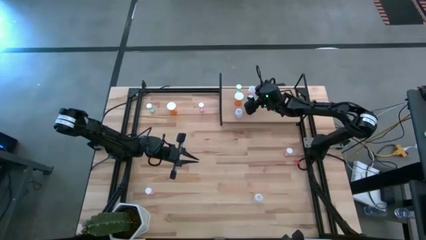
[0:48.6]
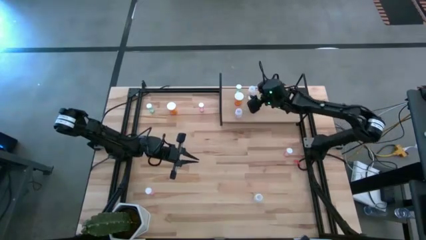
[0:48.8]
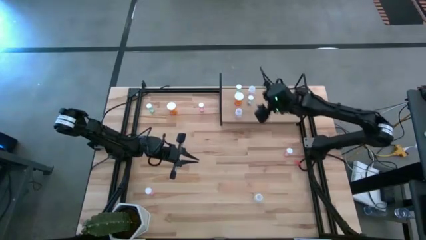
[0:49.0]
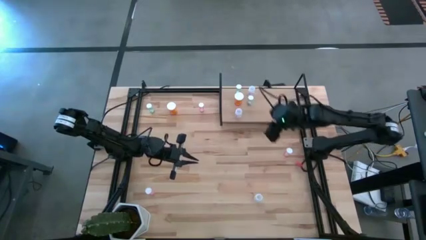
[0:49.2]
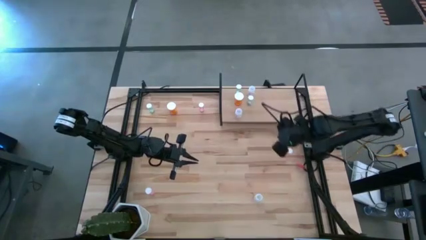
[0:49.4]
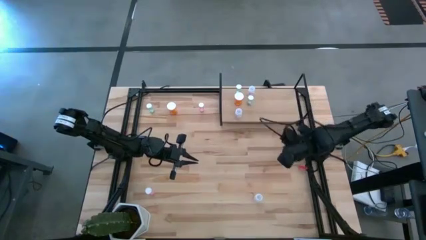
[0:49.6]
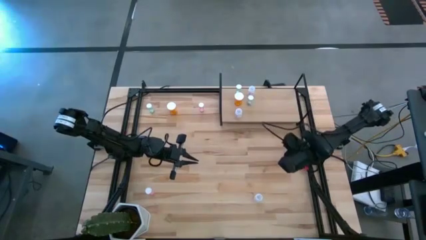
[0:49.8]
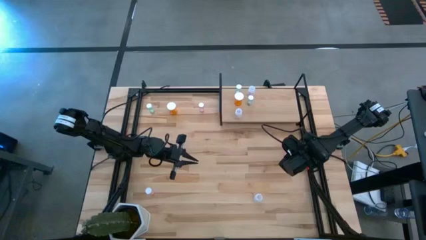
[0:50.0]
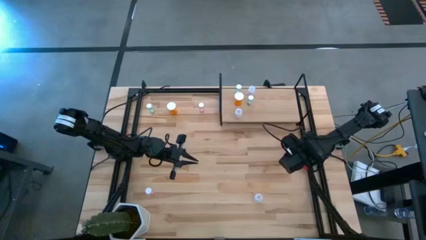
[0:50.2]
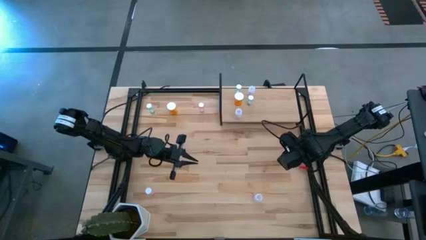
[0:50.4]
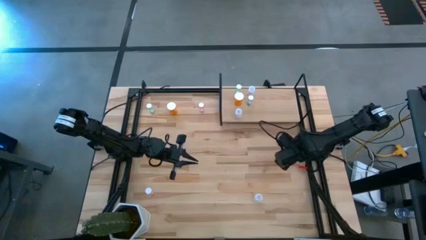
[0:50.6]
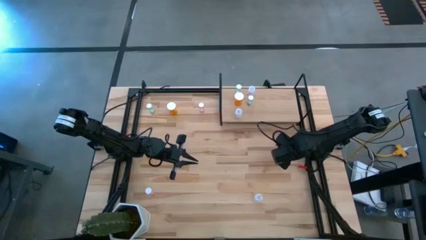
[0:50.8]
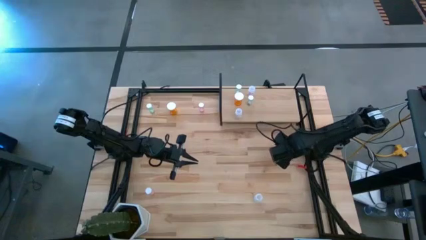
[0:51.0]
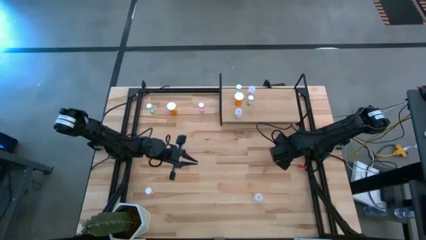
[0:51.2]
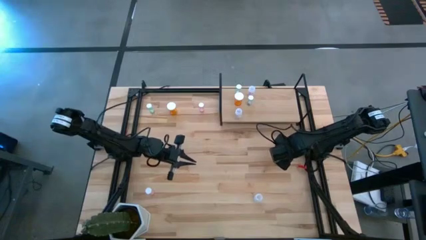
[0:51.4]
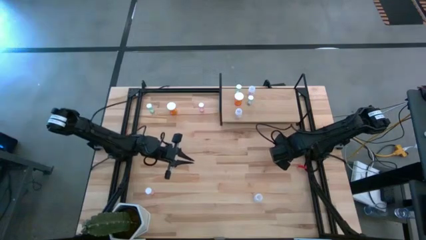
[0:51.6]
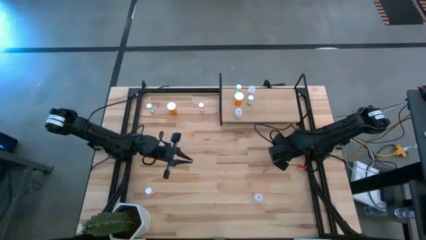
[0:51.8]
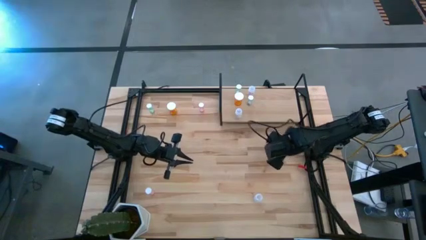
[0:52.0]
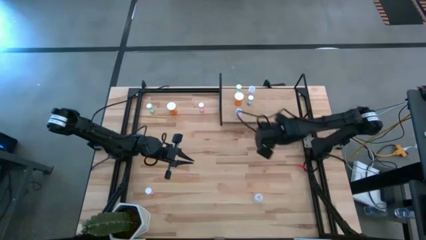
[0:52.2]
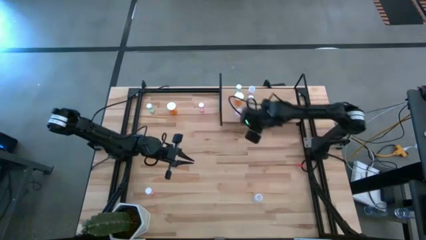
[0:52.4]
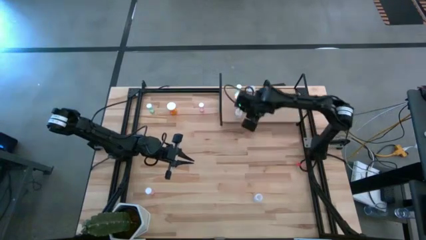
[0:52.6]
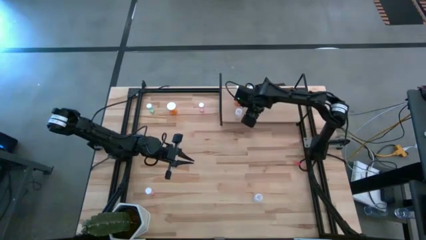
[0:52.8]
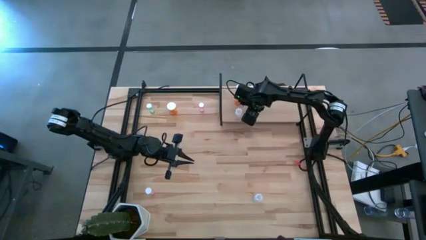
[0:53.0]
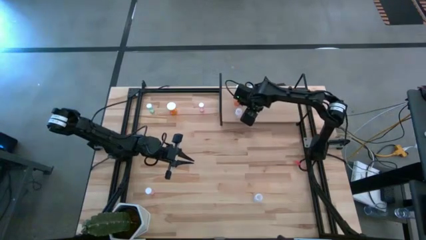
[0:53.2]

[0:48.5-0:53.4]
Task: Pick and place medicine bottles onto shelf by color
Put the middle pink pill bottle on the shelf

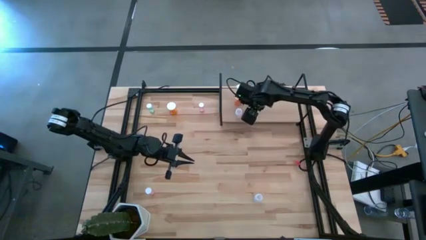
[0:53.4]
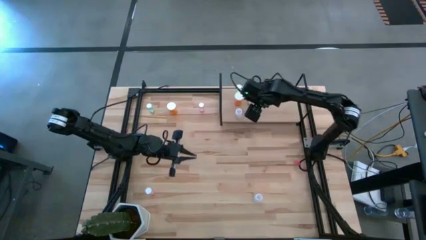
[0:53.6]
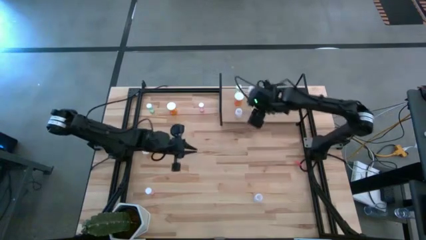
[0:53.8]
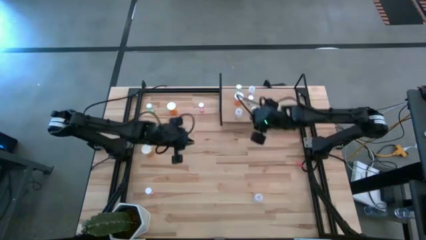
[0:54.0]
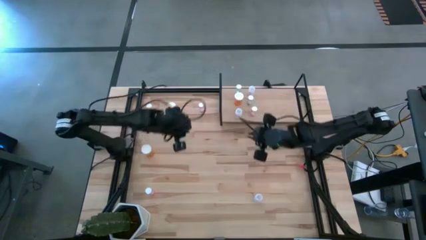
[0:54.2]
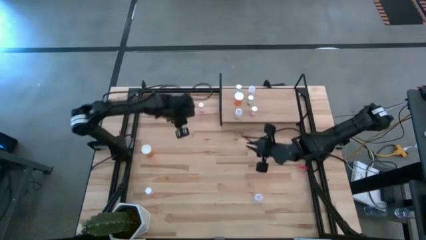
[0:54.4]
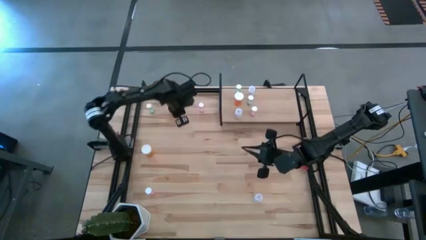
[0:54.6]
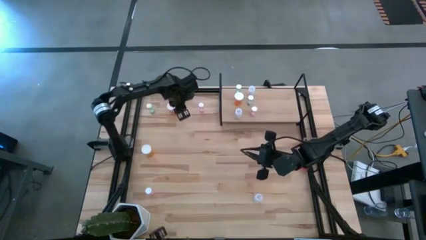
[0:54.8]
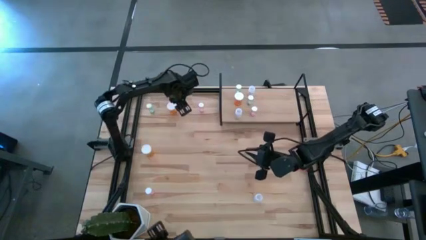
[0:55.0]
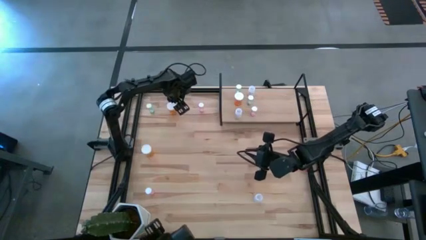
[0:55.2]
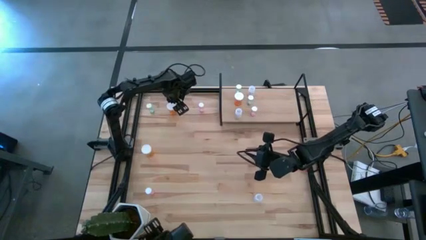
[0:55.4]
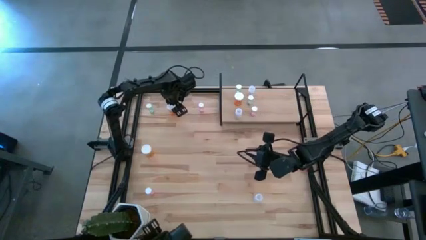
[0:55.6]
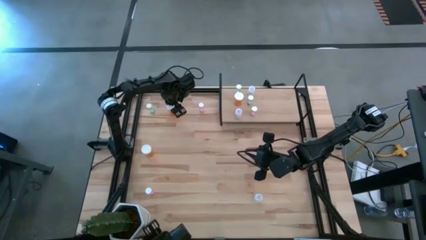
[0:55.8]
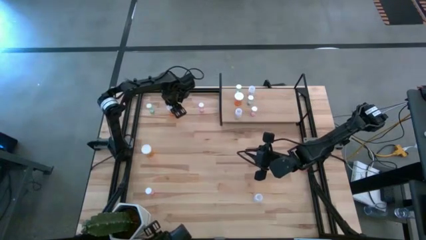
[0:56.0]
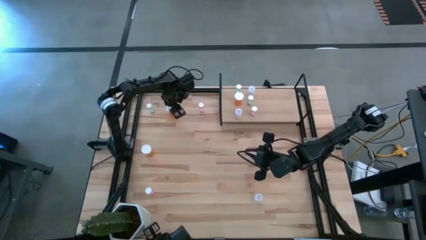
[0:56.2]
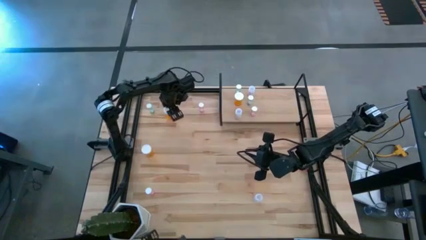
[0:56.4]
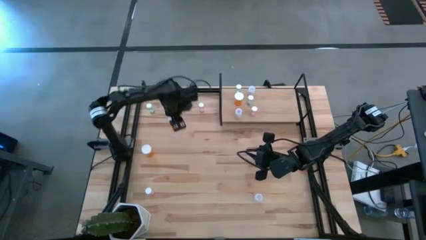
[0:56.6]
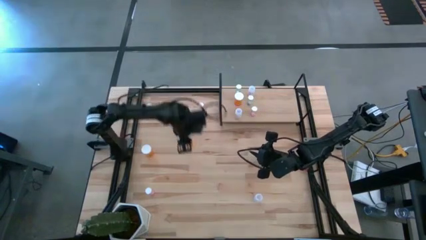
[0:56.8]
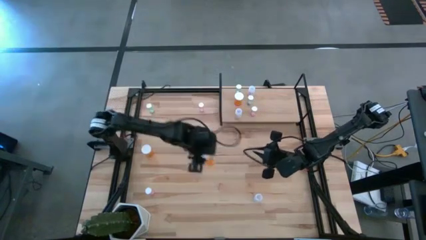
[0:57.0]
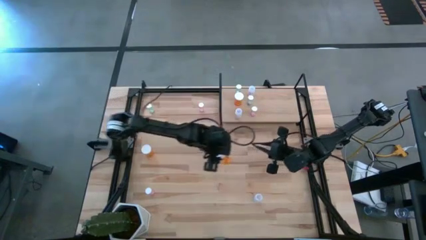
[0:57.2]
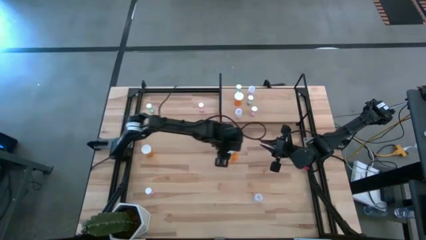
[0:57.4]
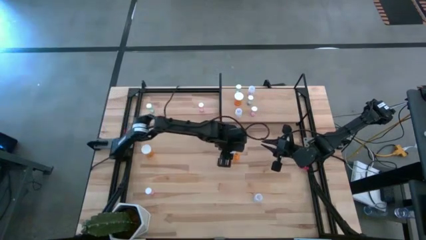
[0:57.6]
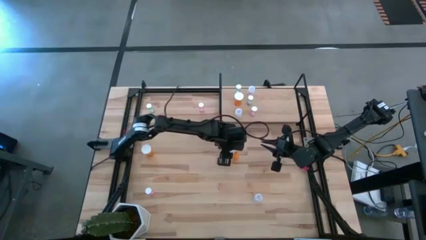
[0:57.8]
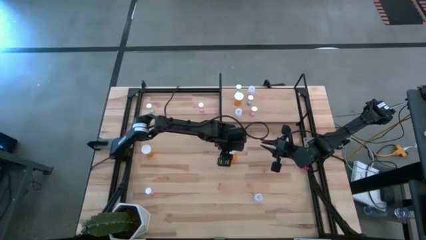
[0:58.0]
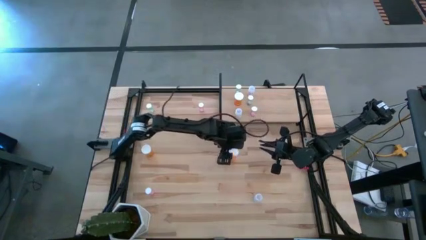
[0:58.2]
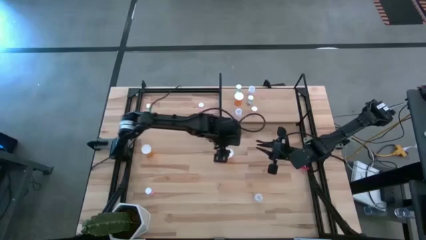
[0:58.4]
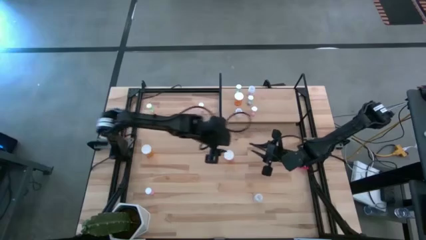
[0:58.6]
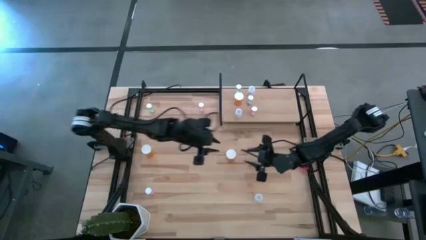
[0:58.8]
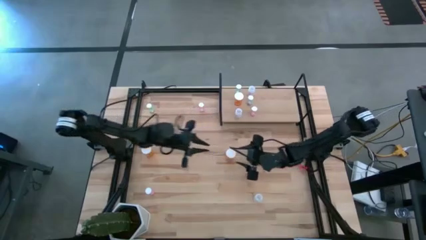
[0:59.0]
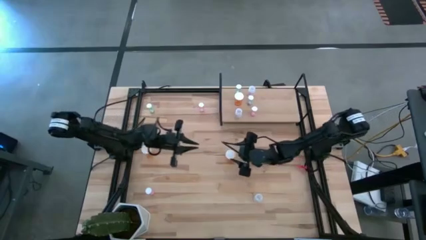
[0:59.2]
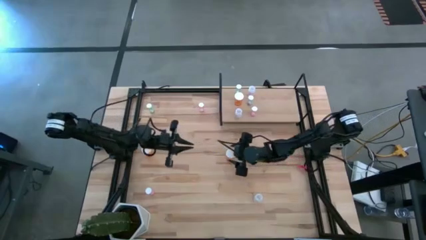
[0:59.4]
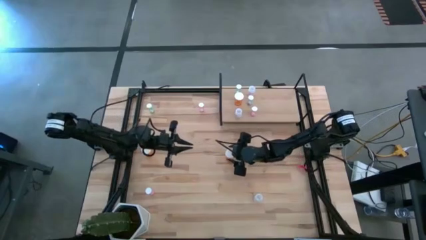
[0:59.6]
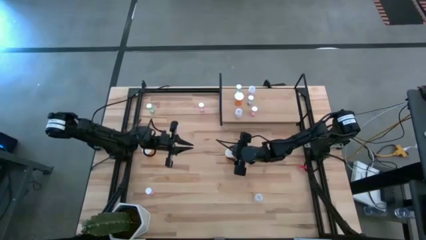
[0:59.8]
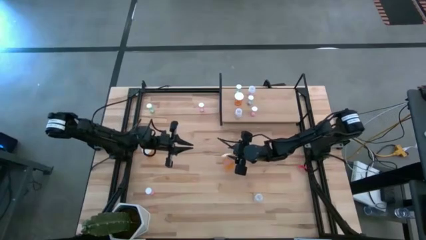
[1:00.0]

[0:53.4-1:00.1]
Put the top orange pill bottle on the shelf

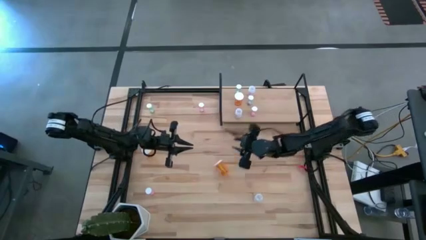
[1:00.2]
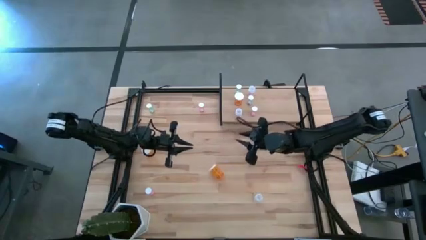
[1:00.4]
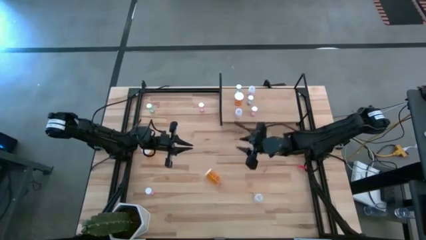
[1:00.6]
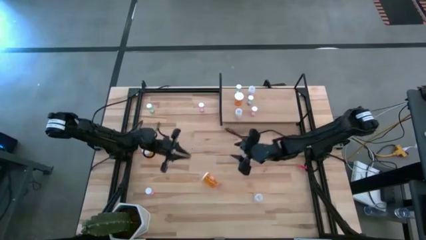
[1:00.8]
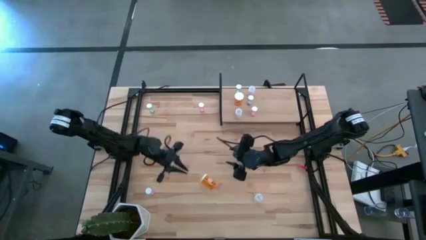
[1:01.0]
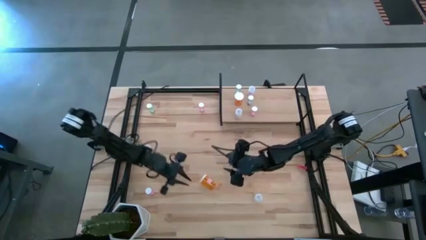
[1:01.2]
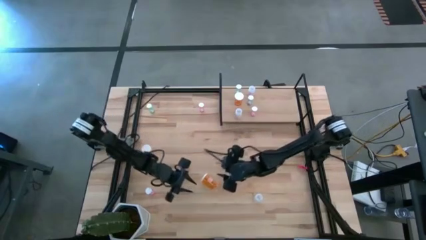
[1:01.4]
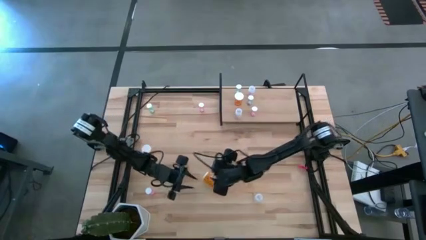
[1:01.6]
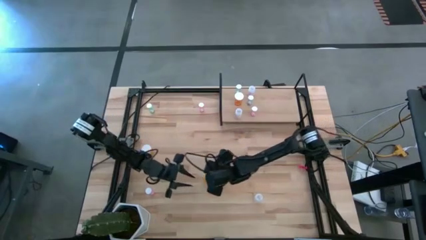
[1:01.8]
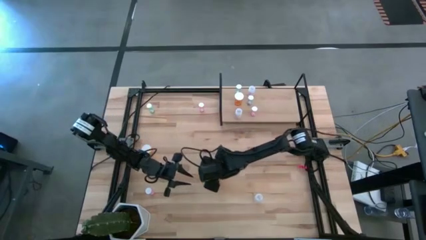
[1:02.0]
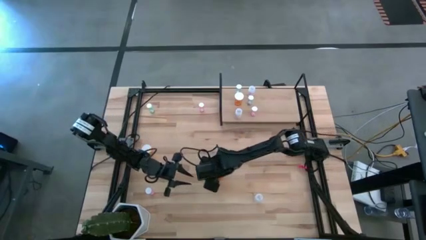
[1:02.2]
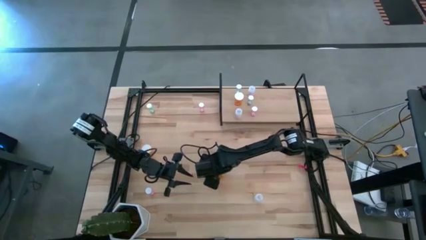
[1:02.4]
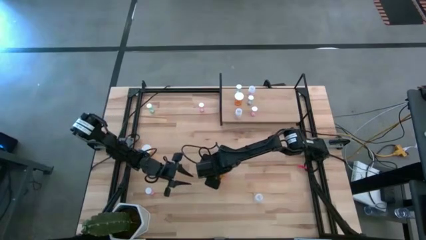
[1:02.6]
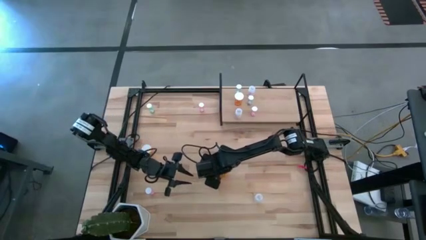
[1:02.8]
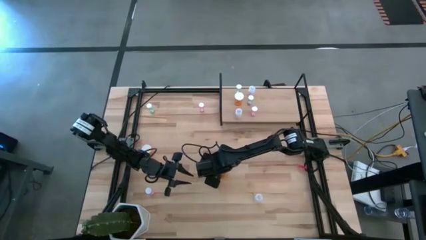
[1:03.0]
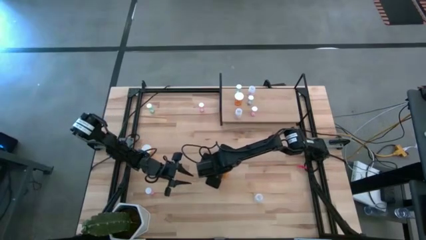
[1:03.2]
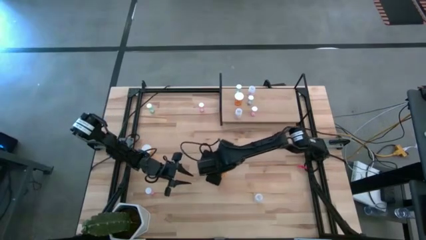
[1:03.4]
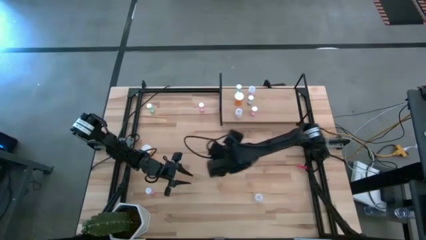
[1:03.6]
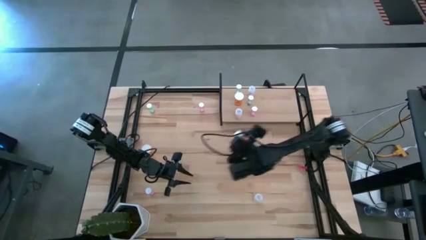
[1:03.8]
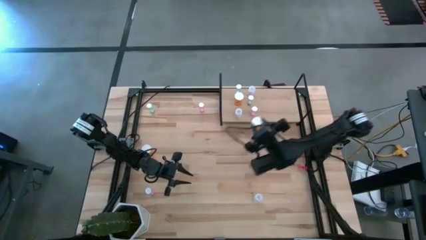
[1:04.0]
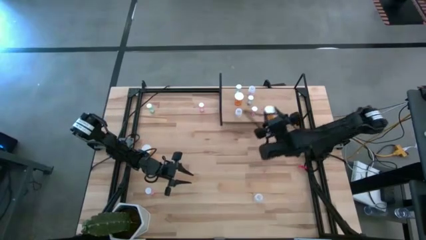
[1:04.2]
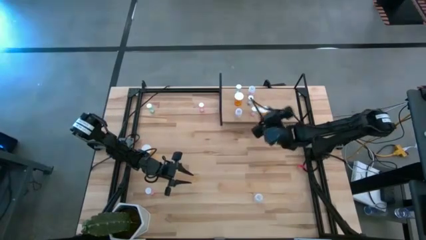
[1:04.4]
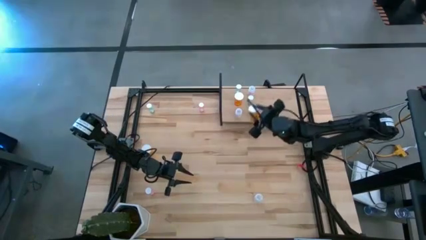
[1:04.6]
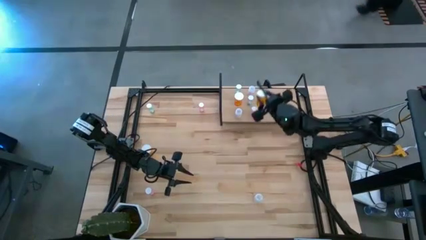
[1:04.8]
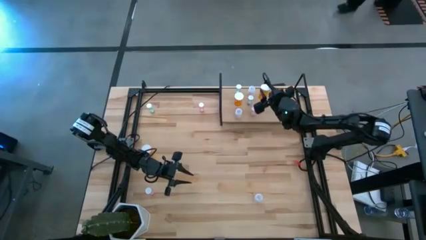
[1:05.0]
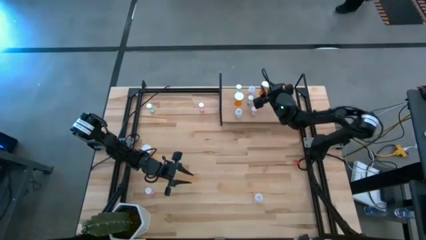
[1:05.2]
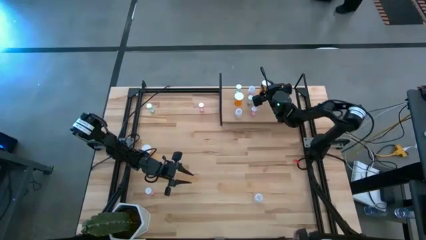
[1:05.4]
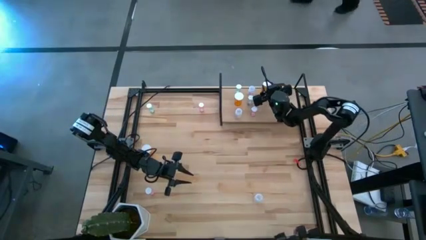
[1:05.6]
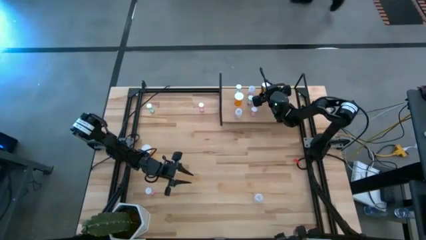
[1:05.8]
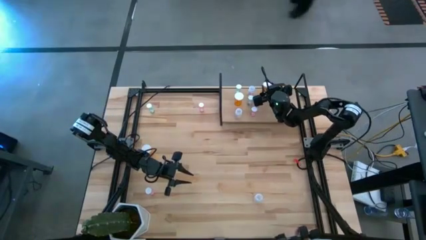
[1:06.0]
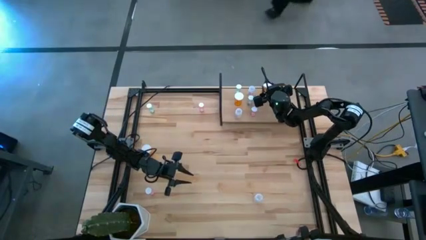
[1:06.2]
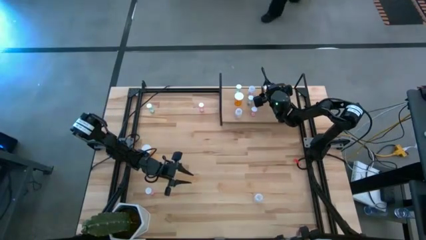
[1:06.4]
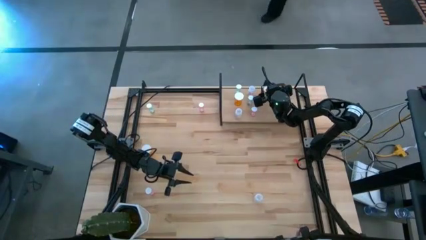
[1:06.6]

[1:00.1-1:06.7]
Put the bottom orange pill bottle on the shelf
